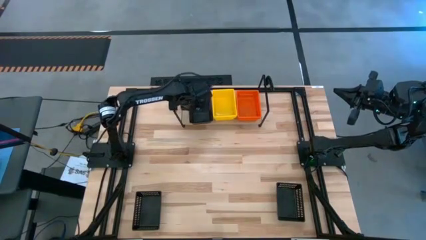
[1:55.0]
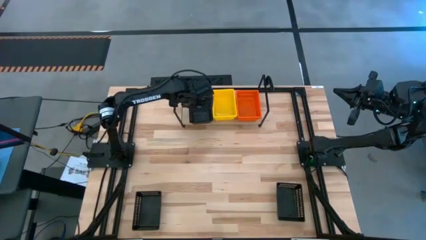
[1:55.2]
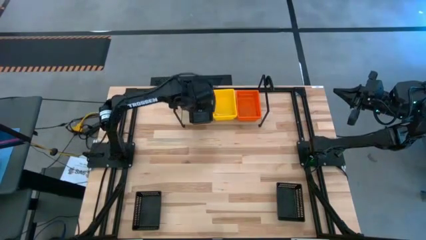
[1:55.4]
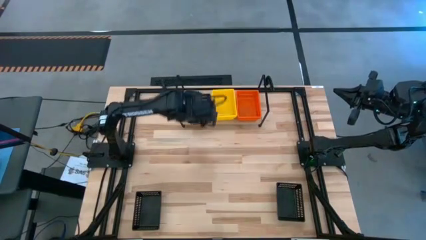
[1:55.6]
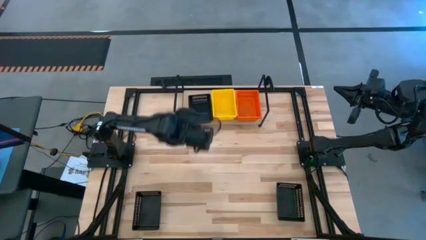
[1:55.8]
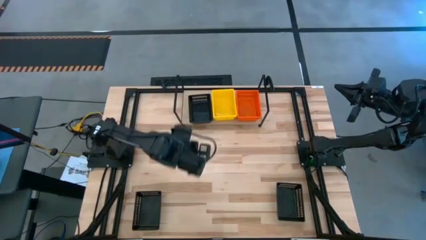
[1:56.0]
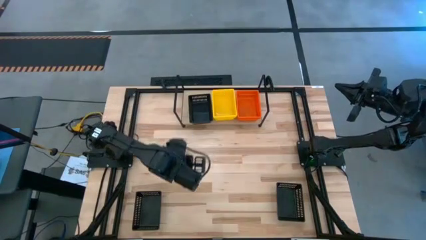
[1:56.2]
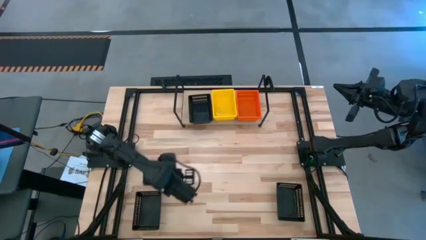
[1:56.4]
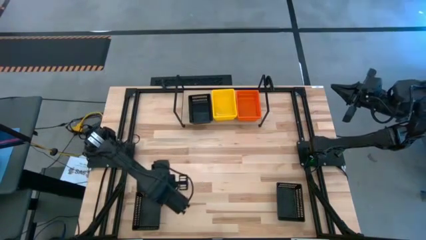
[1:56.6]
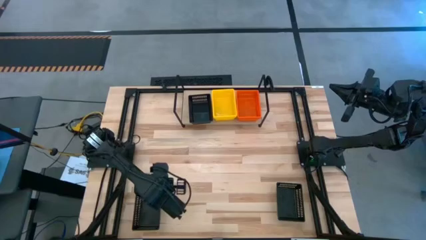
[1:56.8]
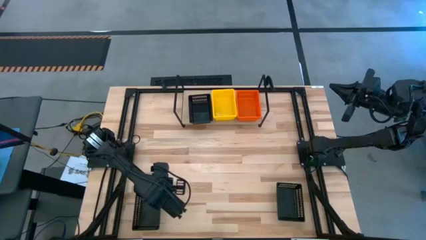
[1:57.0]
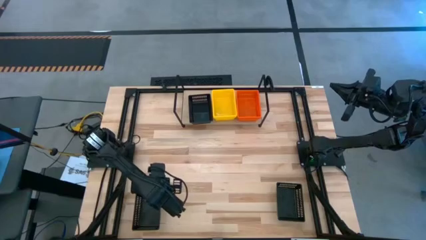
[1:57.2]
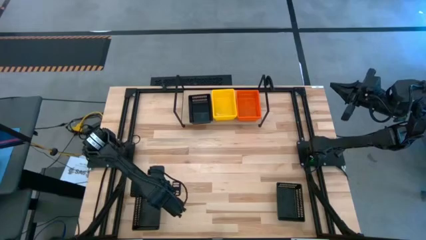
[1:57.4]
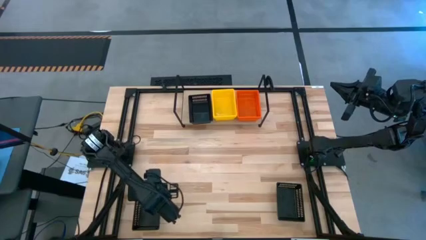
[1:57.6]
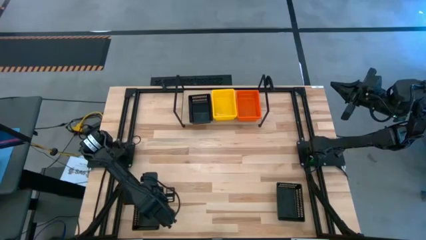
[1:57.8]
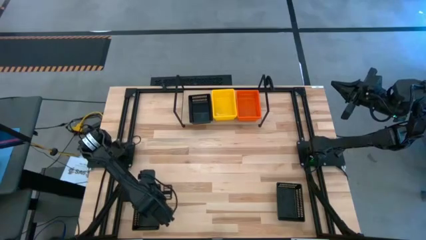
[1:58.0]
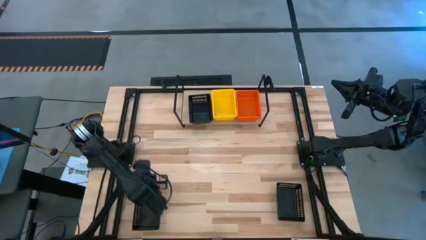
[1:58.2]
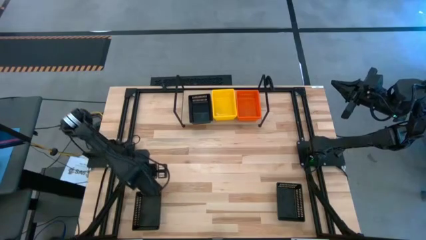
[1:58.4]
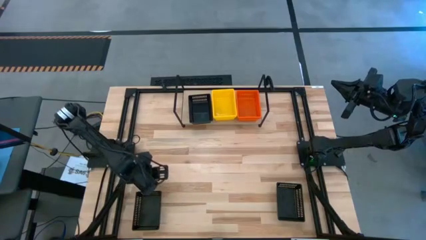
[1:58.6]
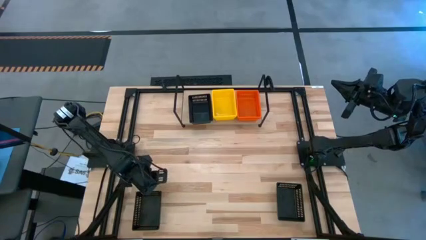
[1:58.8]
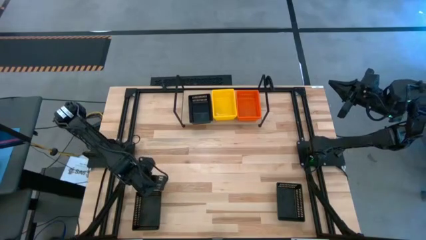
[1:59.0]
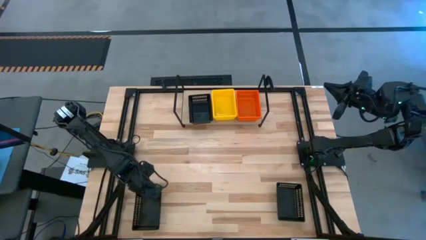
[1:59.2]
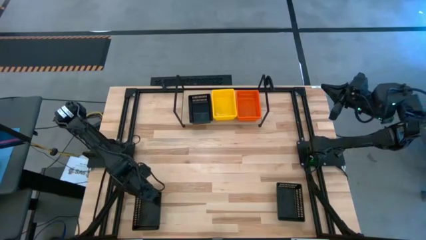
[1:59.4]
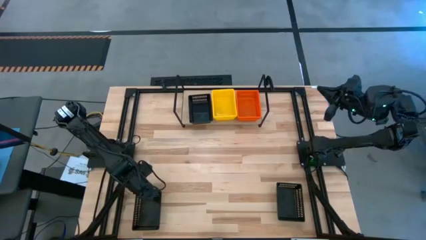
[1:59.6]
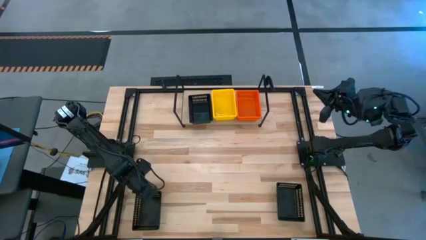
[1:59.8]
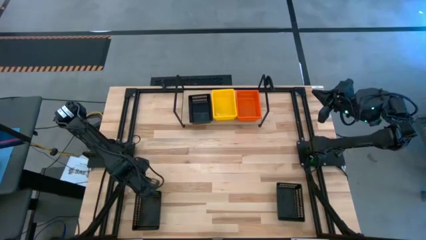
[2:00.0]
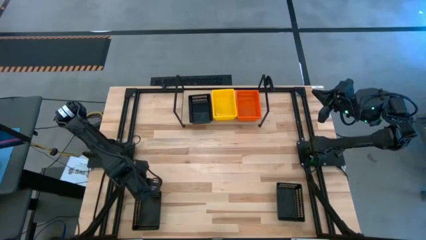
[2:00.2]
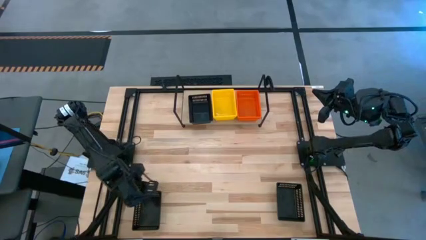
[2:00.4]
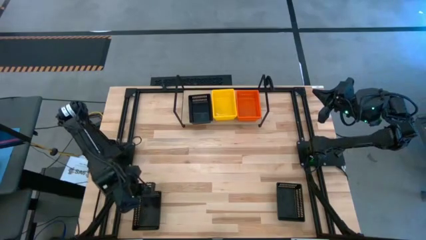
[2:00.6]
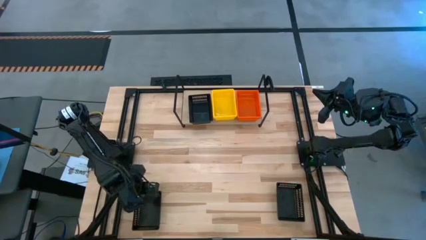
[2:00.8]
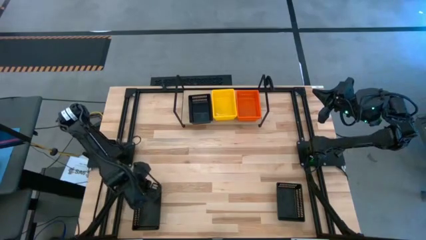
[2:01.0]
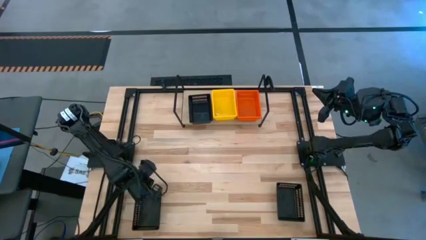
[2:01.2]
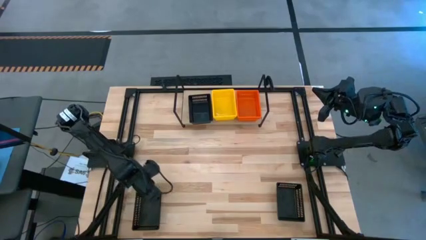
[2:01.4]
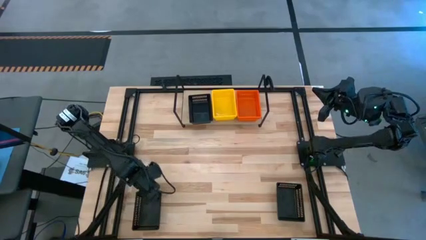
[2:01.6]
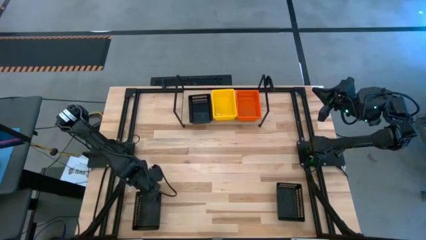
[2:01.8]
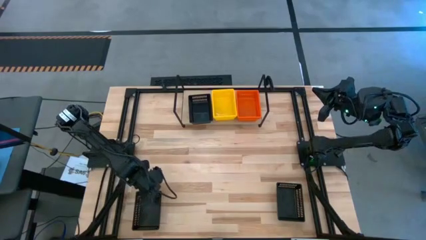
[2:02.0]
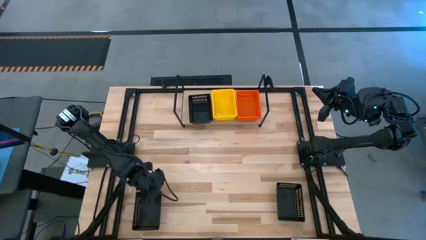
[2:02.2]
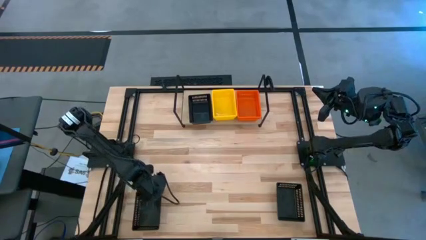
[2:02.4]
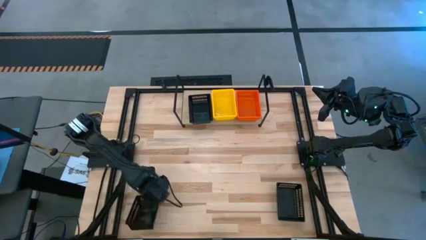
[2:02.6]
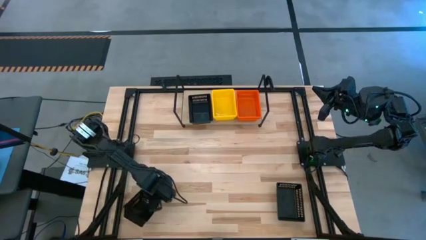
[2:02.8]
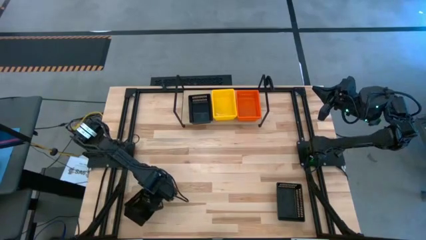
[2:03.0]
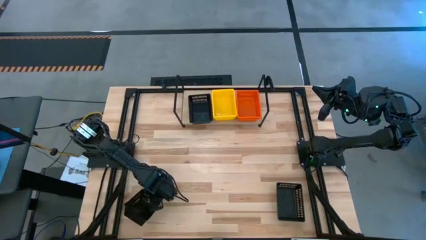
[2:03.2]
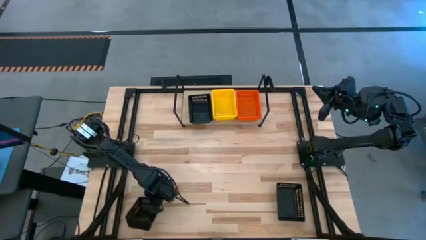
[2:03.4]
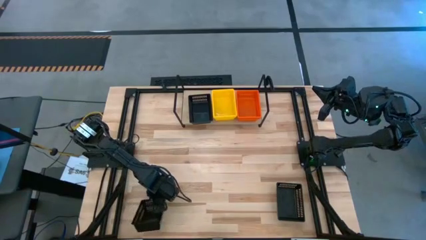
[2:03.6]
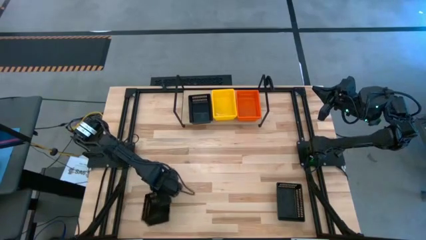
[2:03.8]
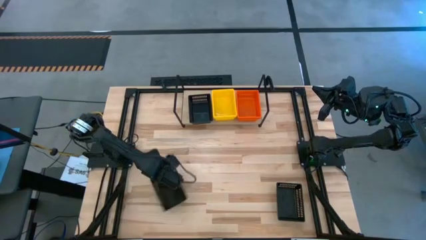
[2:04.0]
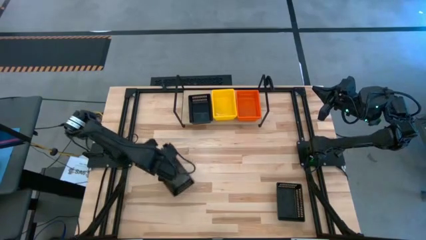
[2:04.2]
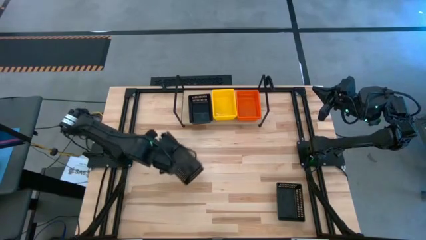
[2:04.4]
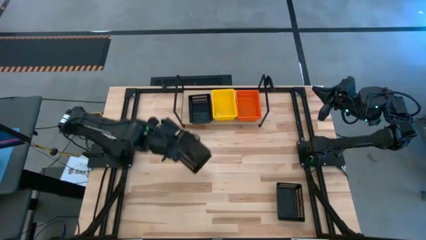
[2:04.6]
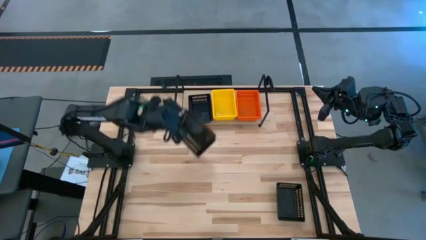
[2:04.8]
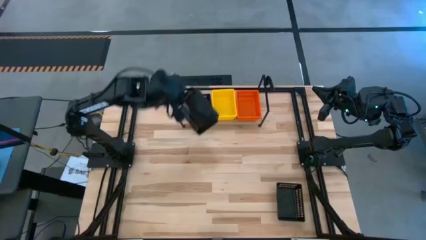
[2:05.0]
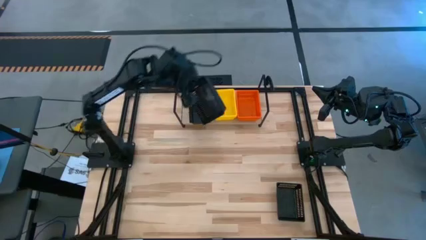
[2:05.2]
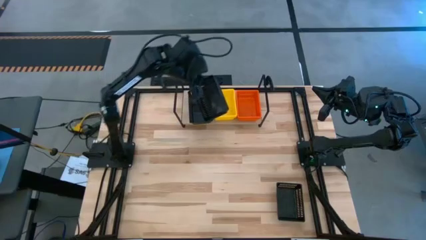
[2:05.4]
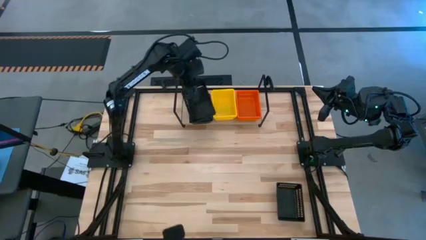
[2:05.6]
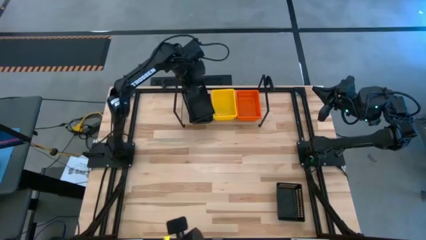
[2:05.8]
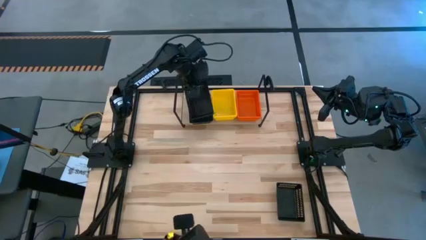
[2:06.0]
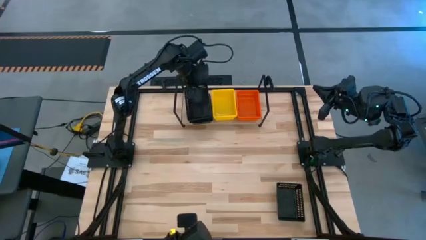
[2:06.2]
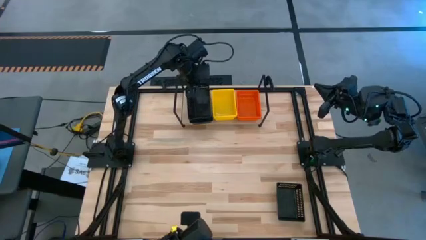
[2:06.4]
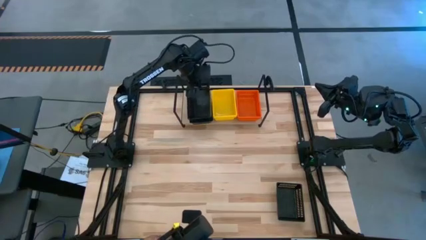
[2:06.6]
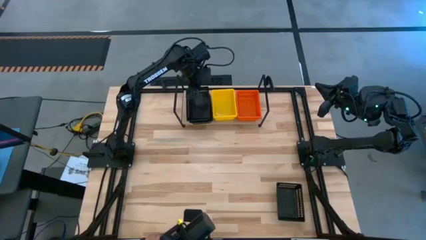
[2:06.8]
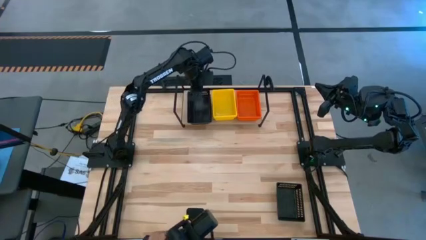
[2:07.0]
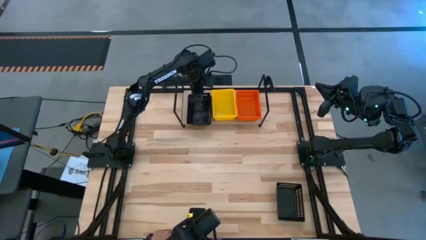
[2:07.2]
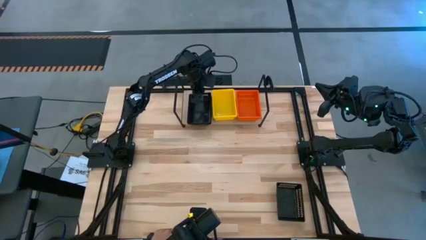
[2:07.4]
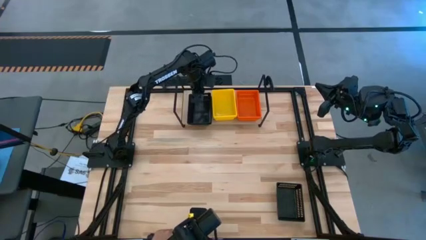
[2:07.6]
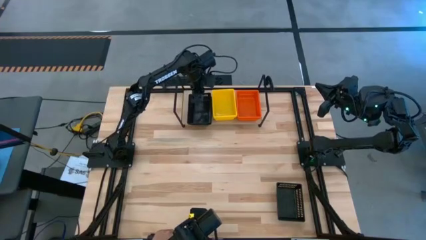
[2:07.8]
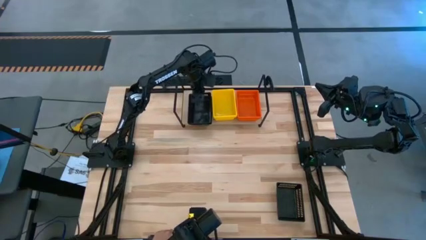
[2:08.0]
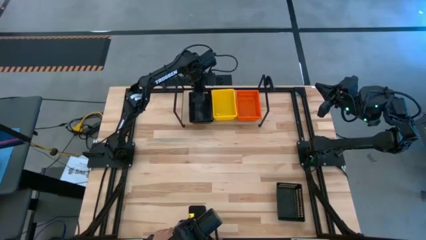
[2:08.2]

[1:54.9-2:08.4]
Task: Stack baskets on shelf by color
Stack the left black bin on top of the other black bin on the shelf
